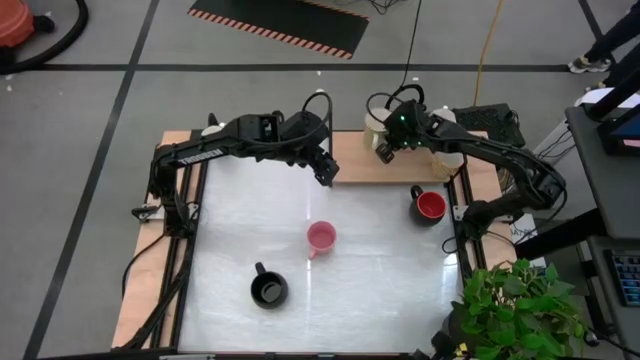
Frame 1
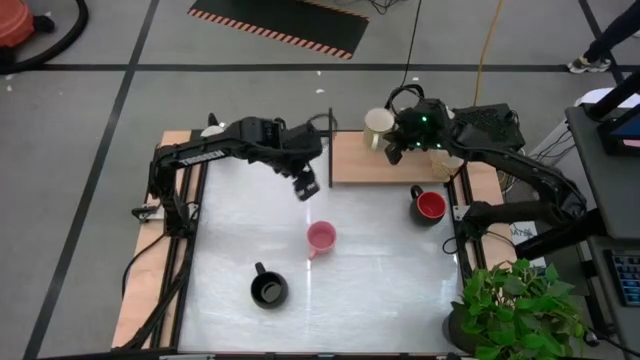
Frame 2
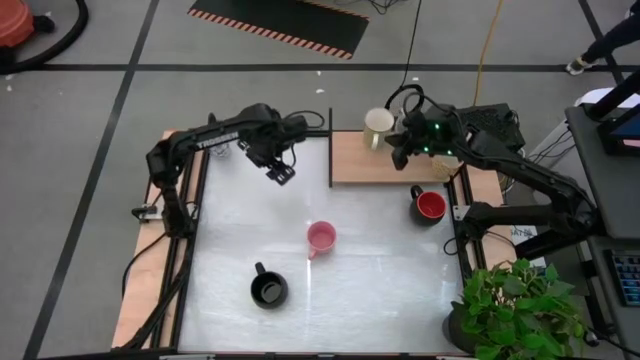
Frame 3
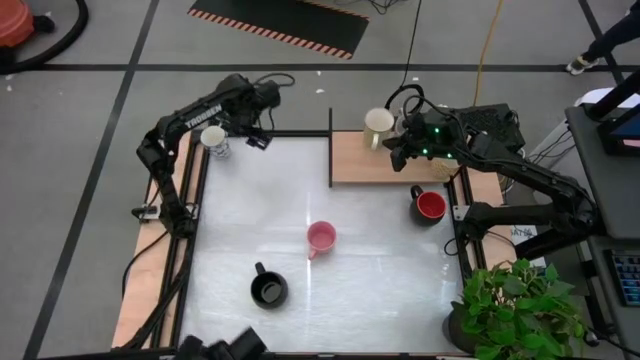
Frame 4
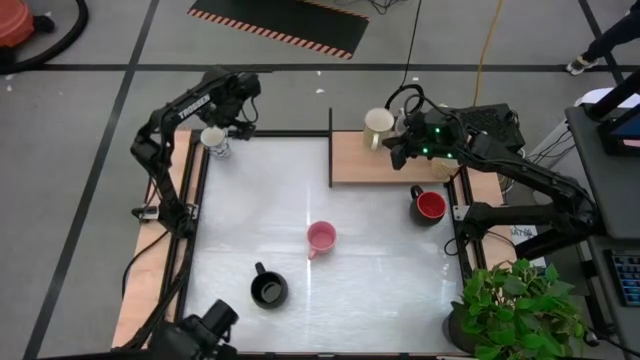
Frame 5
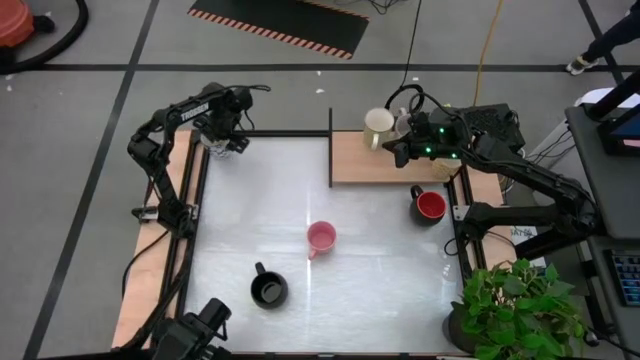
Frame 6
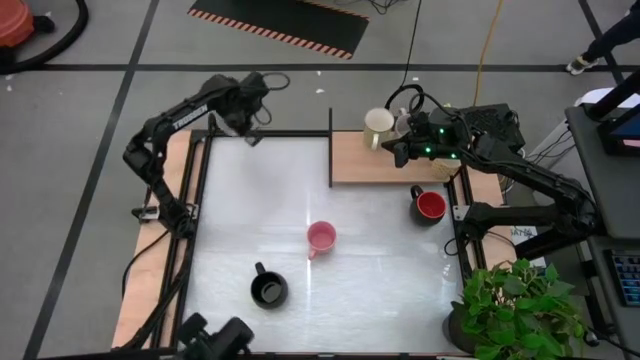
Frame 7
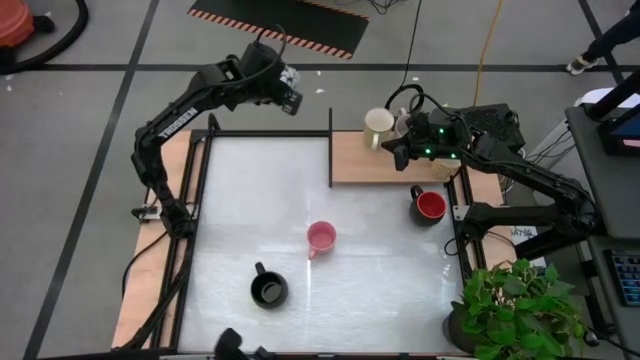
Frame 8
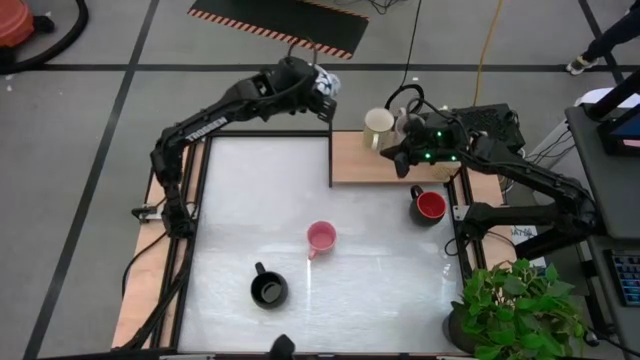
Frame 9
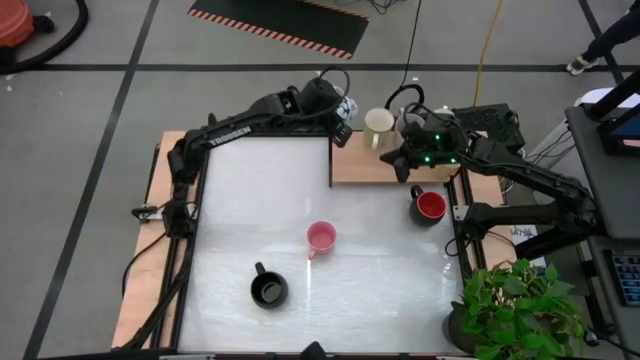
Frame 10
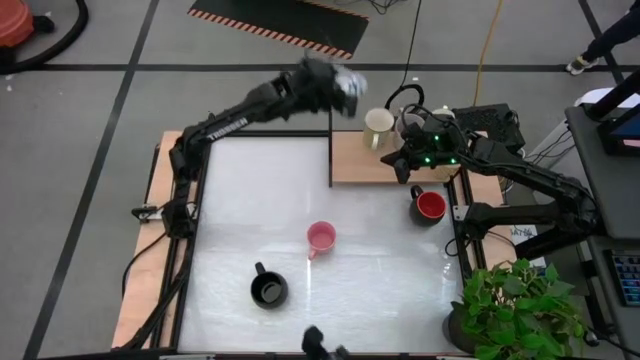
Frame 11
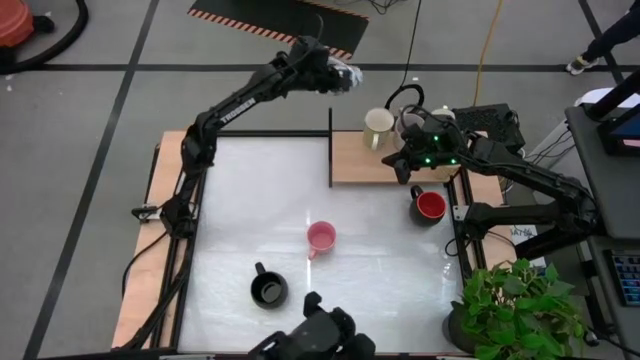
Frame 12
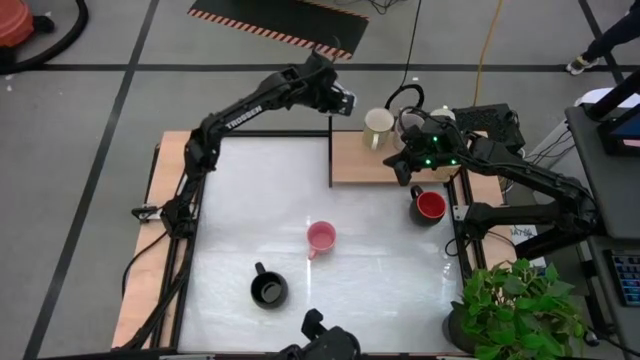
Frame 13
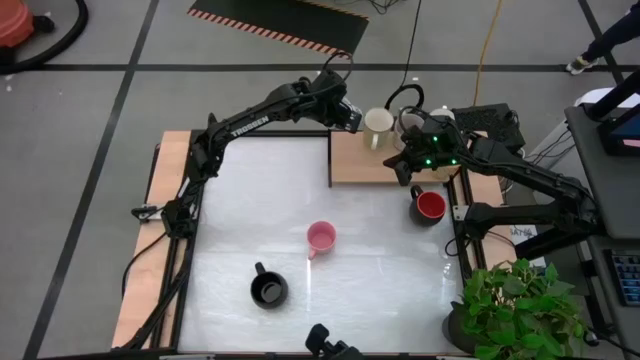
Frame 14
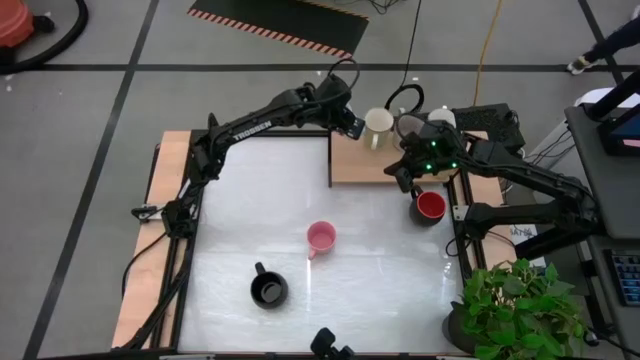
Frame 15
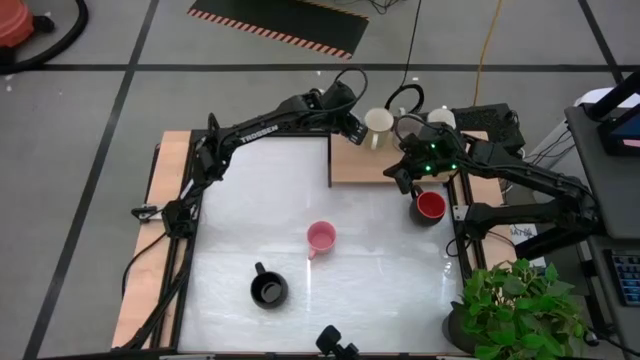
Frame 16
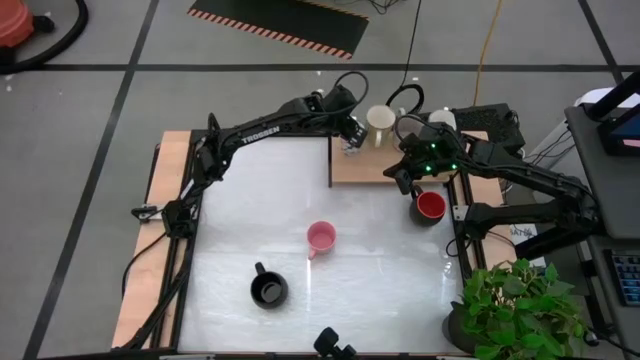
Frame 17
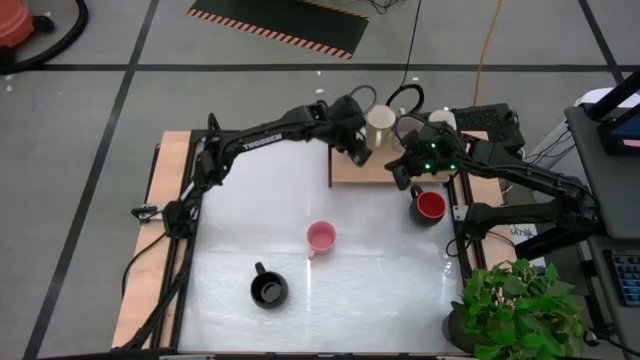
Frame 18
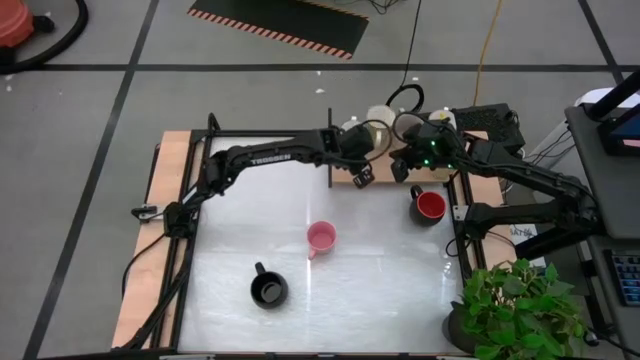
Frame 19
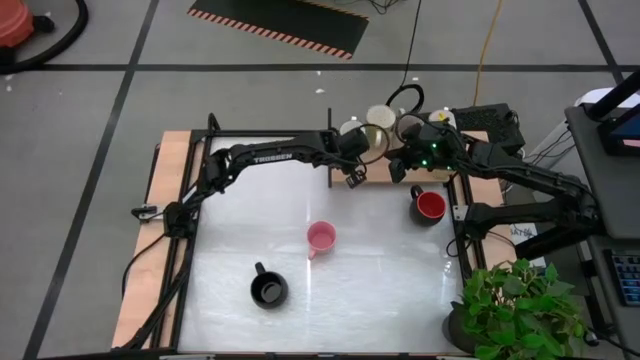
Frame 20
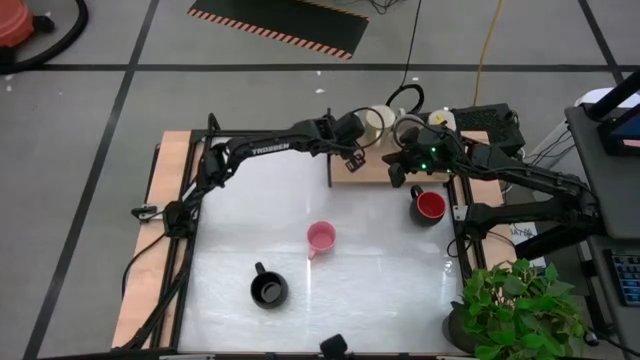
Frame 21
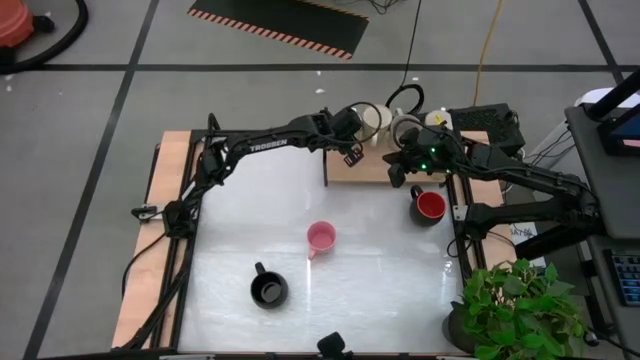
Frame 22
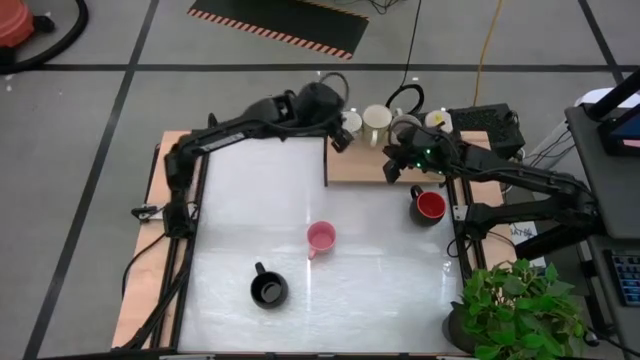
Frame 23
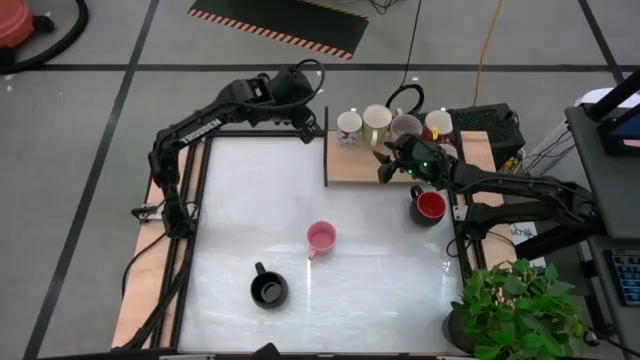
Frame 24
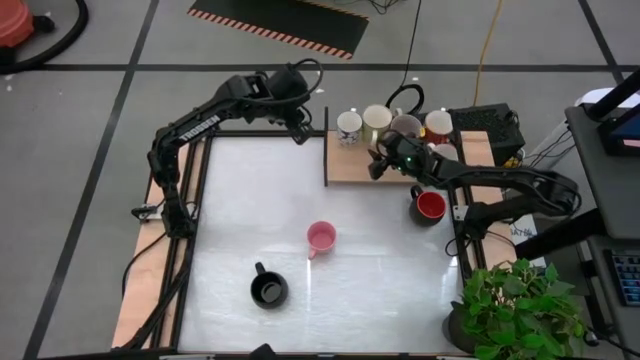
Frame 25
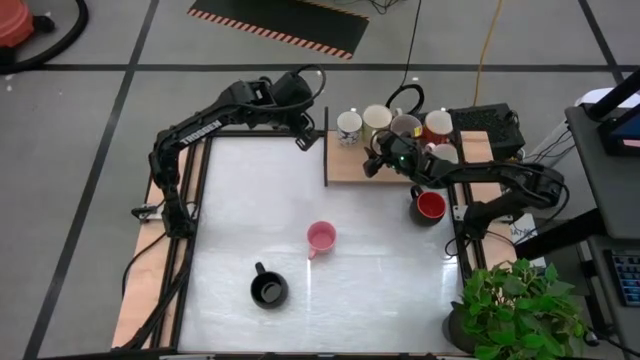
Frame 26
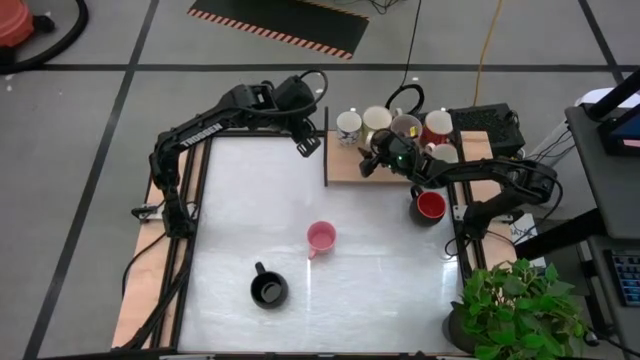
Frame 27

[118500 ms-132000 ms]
Task: Place coffee mugs
Put the blue patterned mug on the shelf

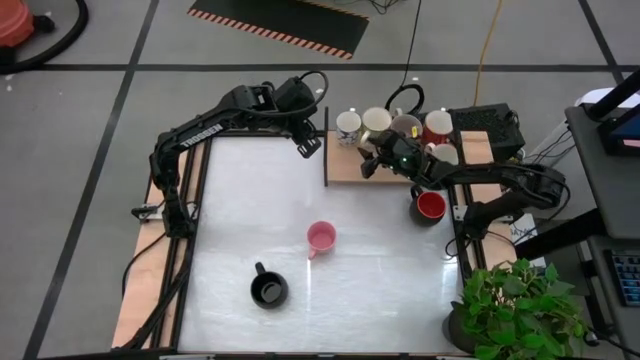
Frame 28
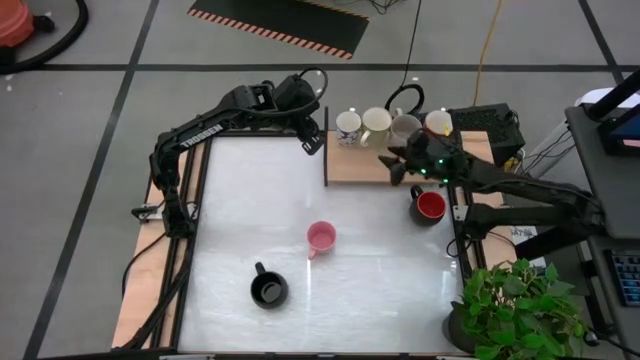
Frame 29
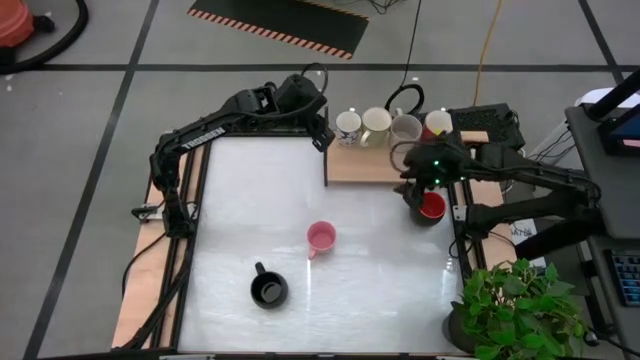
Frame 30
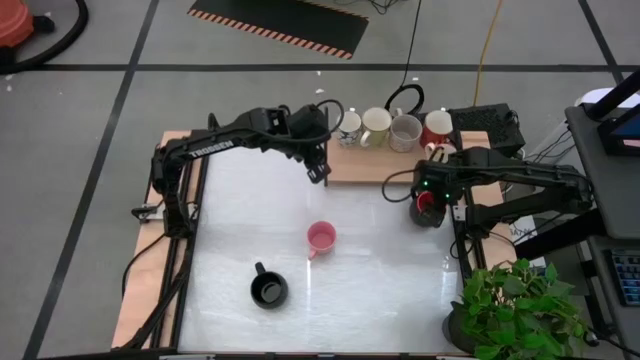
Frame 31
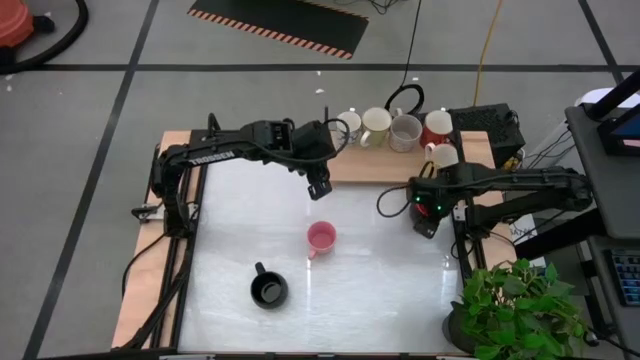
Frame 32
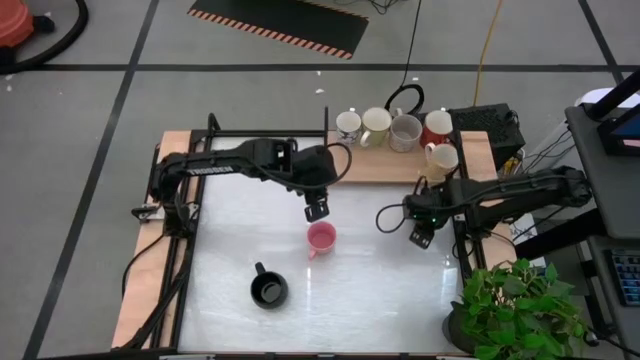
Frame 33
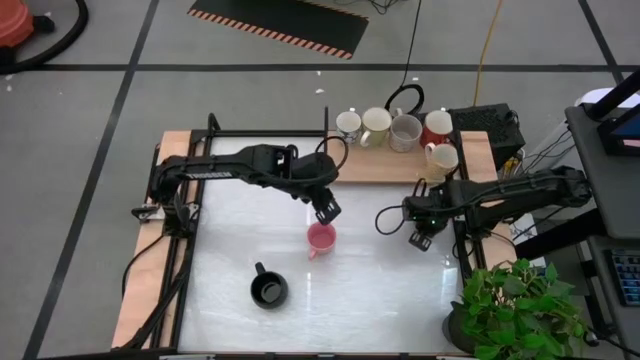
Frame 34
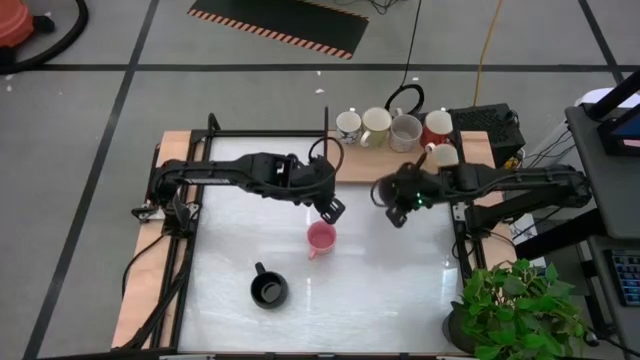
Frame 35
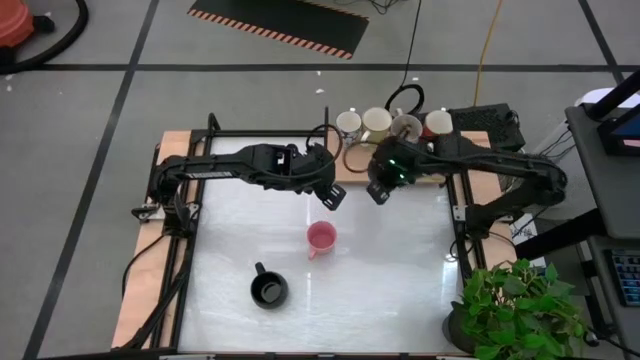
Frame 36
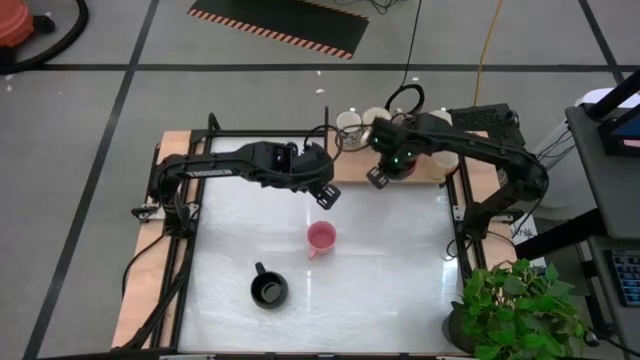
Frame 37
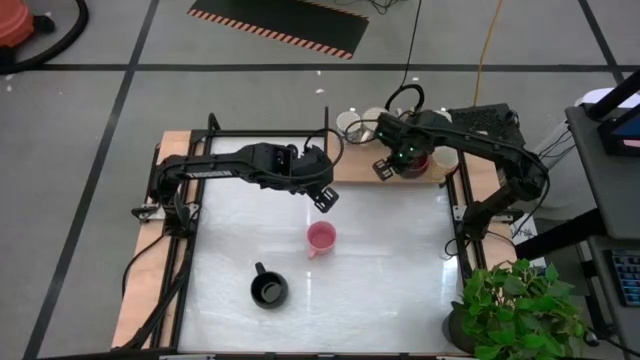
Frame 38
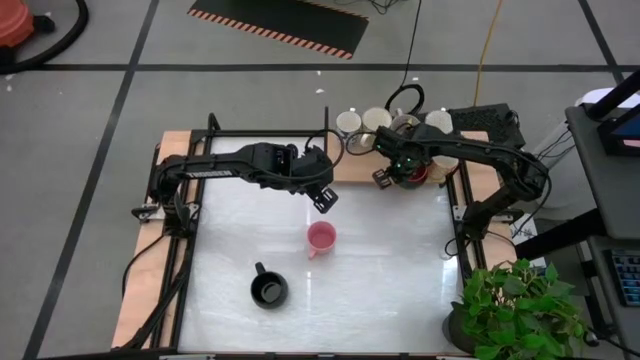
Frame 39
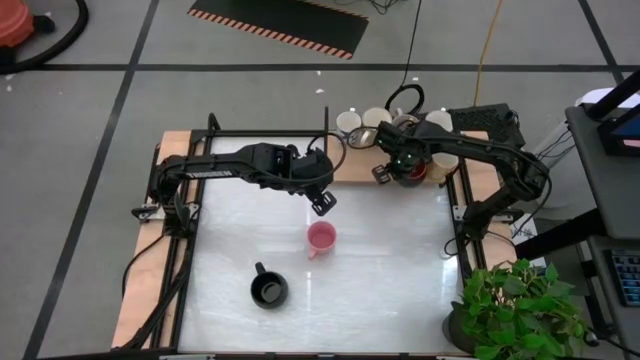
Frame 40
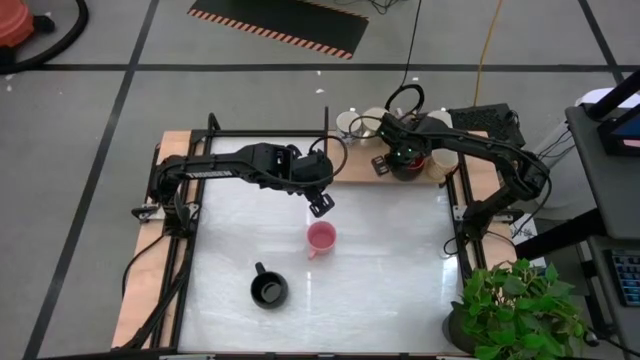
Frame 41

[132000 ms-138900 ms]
Put the top black mug on the shelf

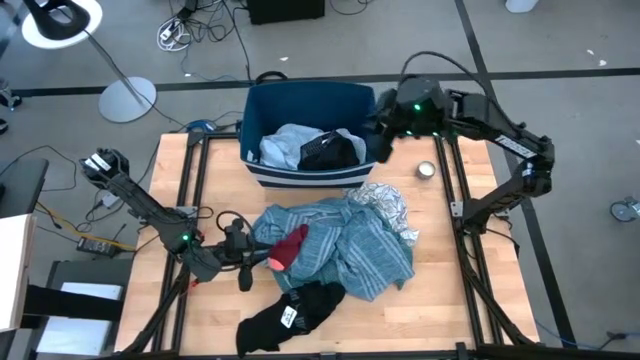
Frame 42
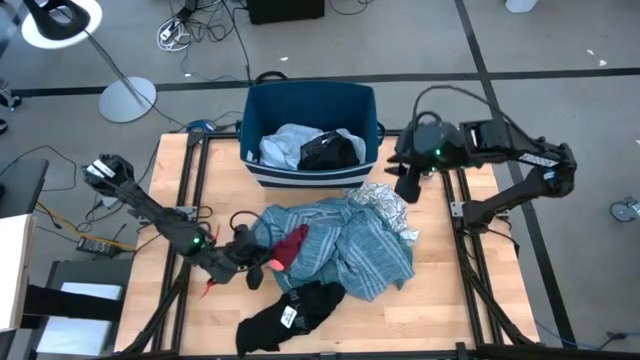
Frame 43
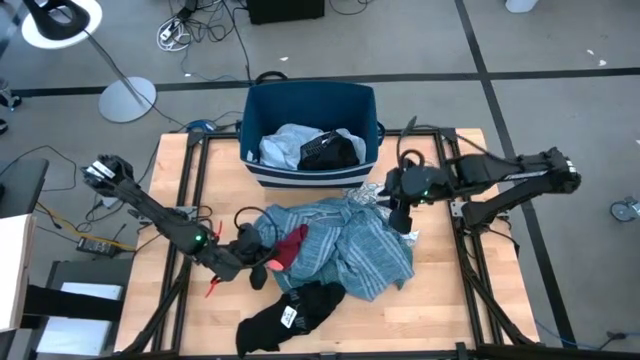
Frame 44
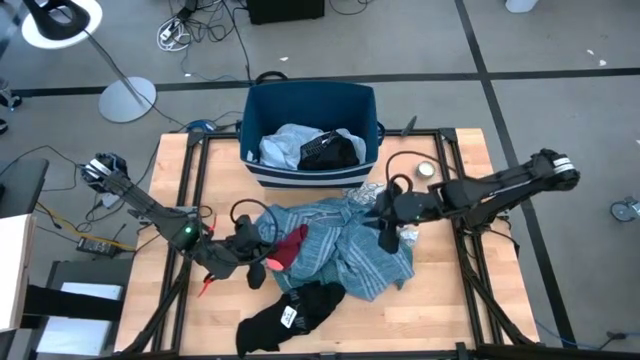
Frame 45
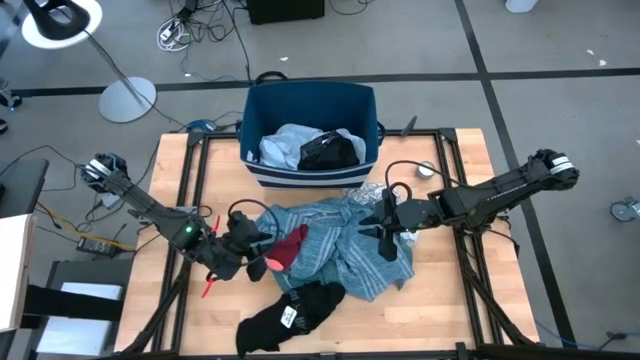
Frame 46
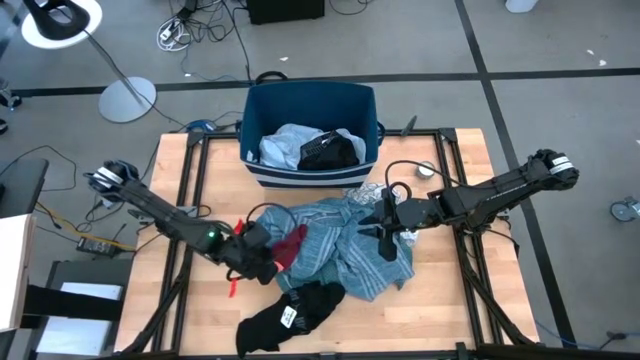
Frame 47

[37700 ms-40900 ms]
Task: Sort clothes
Put the red sock into the blue laundry organizer
